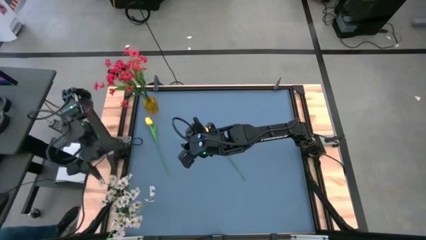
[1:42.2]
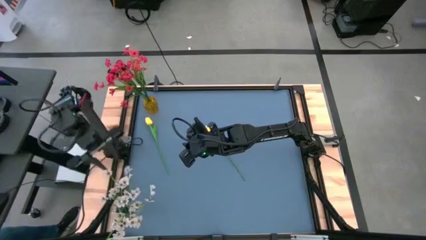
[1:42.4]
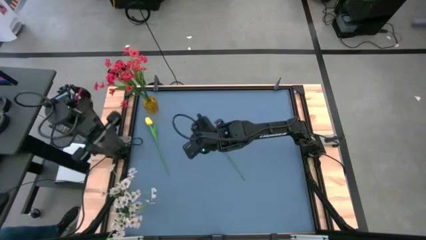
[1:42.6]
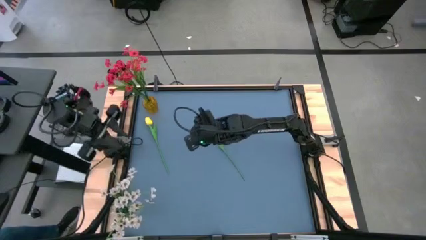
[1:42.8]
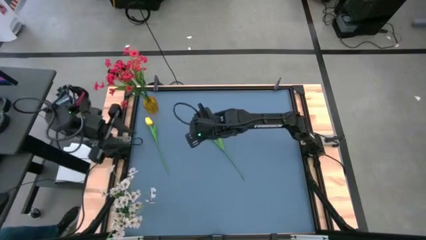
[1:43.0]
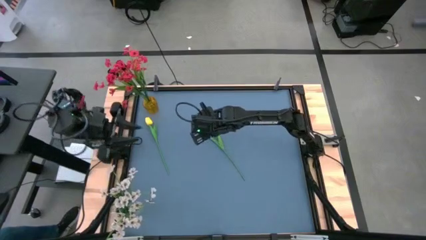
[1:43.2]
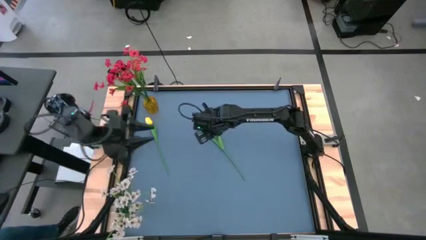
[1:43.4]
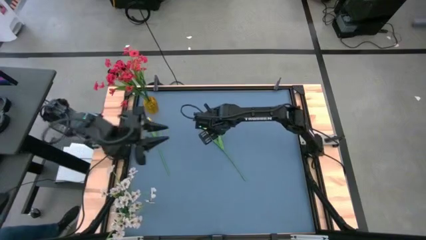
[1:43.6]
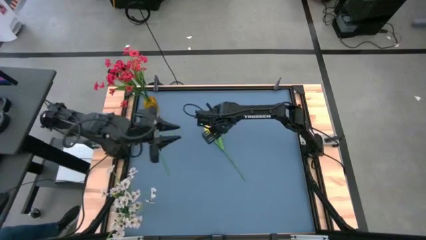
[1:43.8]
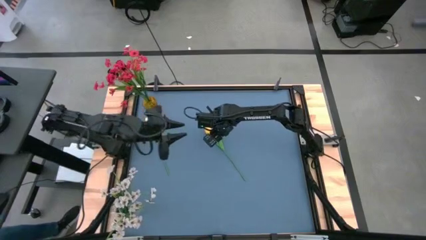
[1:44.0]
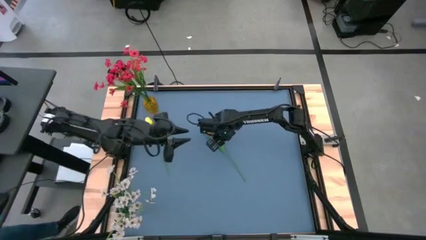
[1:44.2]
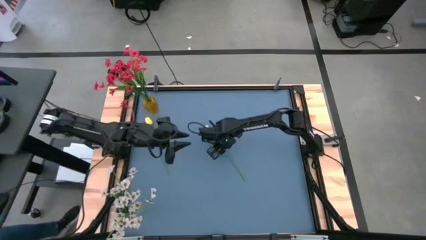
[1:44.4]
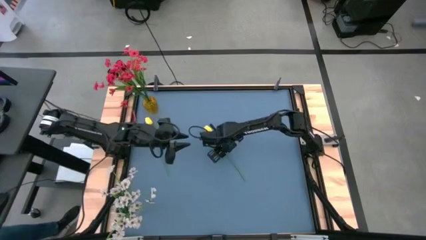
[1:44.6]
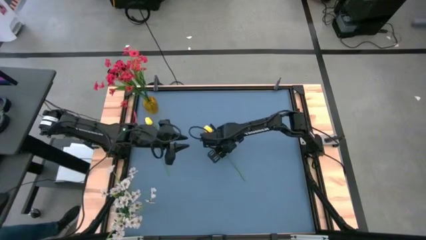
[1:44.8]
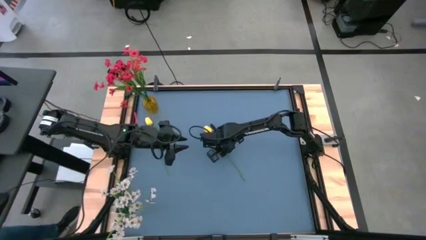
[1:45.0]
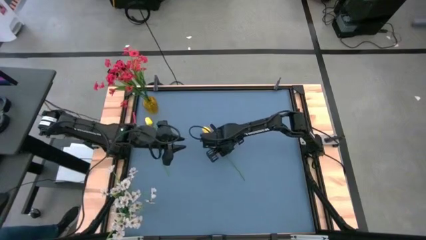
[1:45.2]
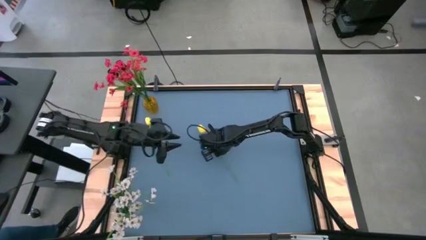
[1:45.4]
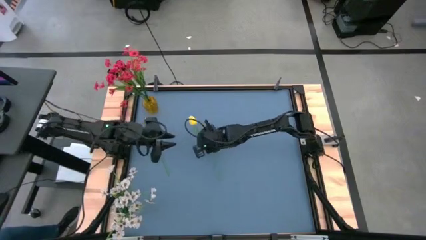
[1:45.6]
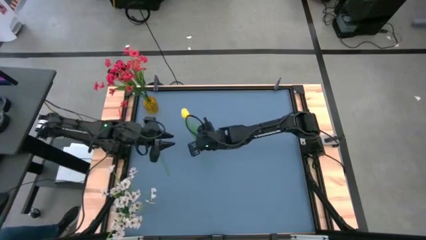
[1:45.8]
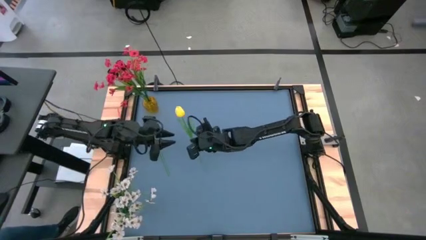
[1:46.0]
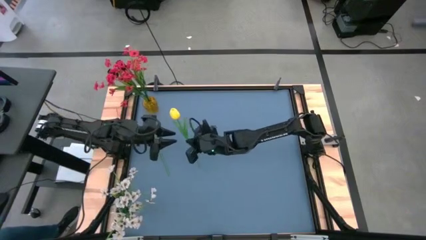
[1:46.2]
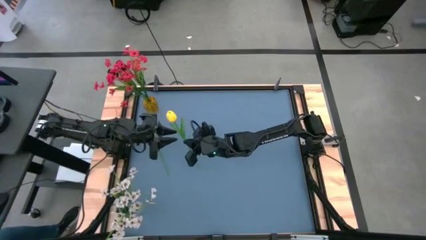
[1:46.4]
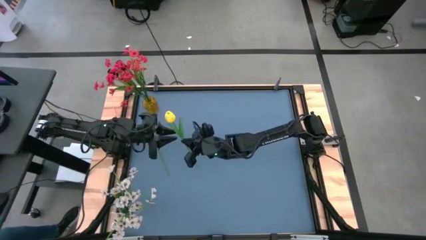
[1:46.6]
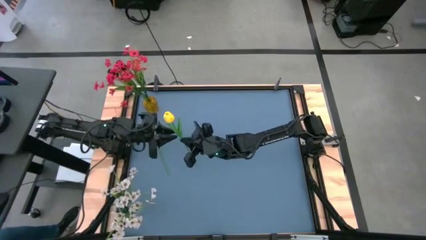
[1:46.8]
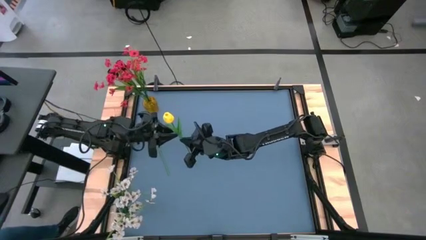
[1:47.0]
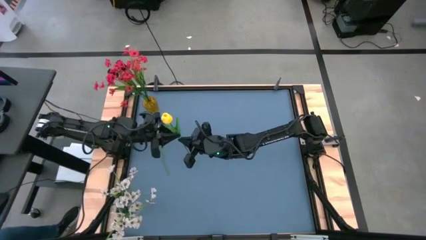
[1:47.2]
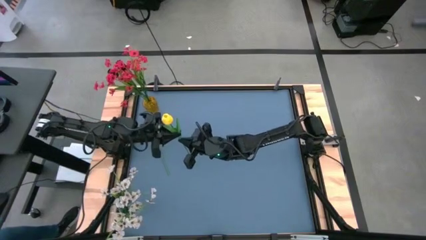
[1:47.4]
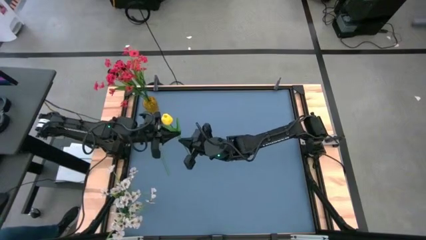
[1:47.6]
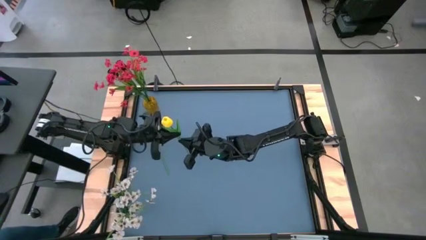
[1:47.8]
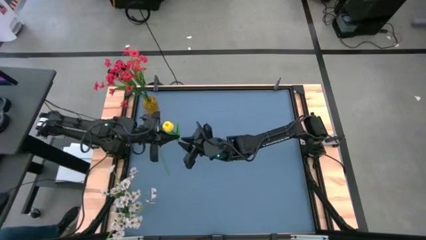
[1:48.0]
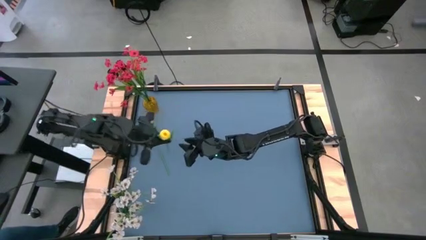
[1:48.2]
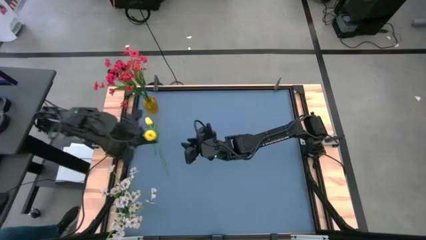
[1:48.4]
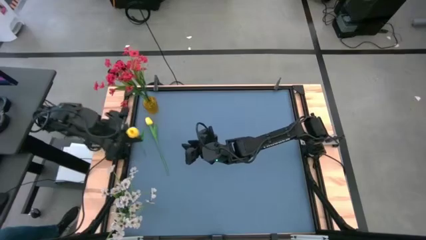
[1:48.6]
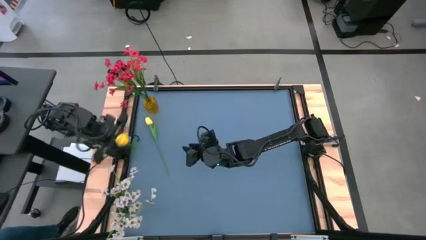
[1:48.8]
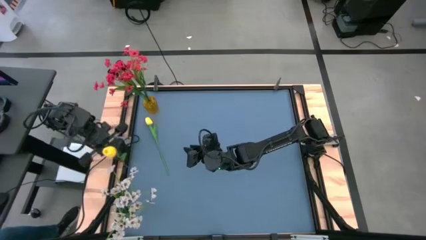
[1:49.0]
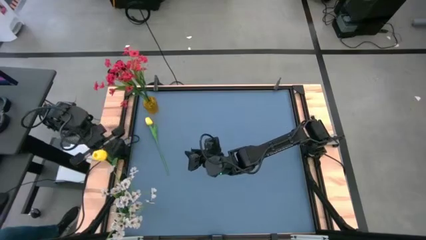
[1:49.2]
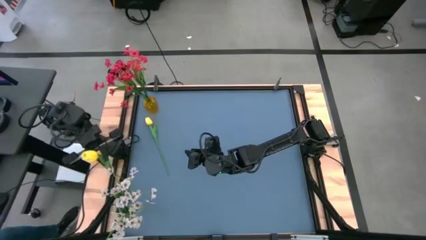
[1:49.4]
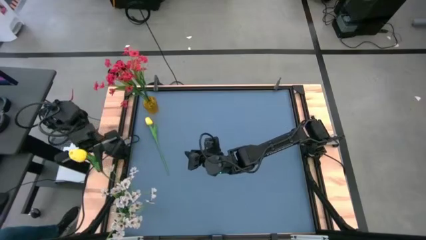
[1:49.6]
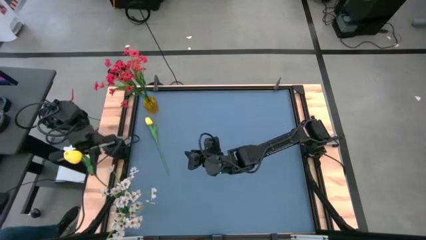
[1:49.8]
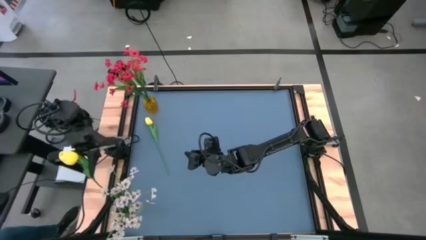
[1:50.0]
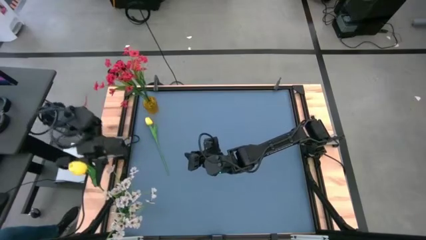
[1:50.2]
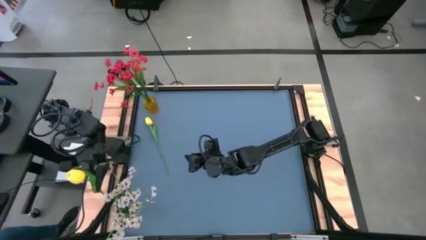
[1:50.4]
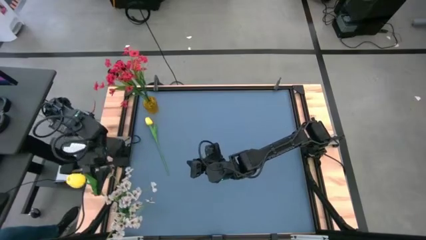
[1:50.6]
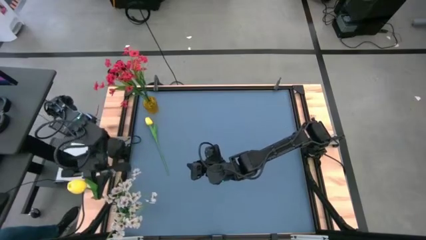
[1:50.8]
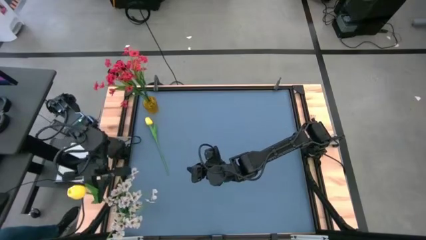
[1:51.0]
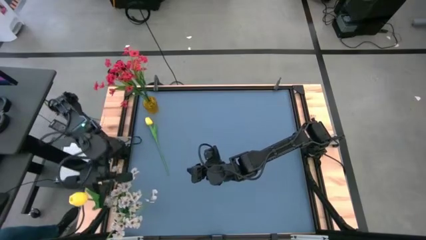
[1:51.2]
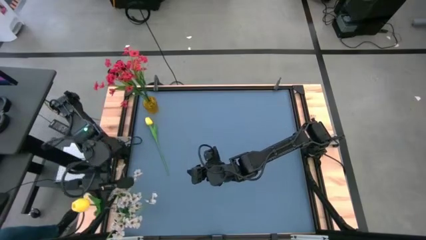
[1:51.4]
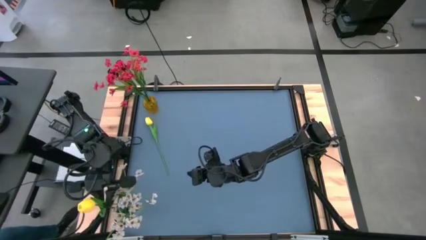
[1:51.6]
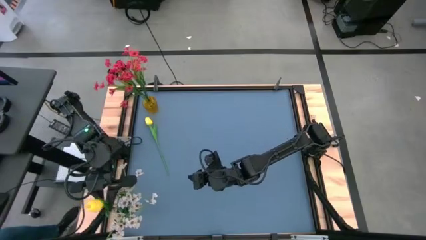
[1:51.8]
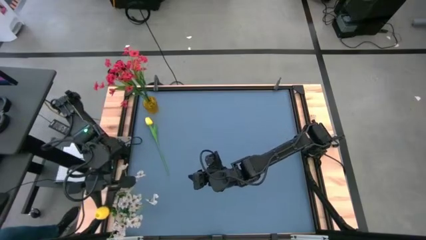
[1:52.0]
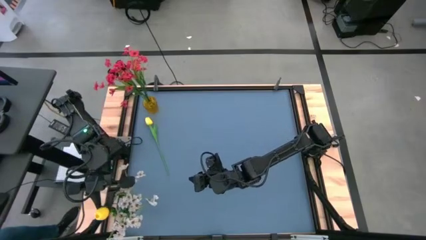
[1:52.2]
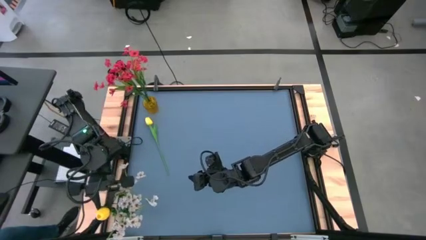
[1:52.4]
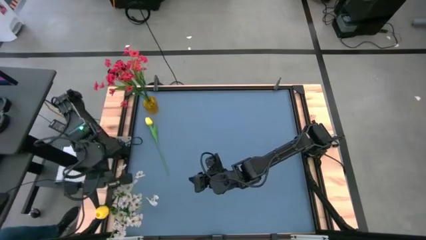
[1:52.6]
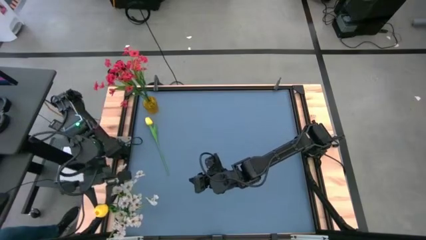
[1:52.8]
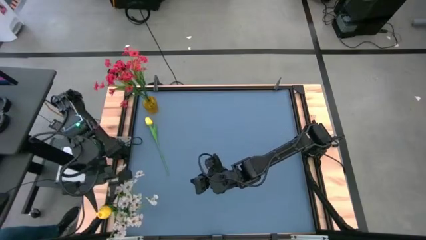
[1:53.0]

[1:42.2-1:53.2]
Task: Sort flowers into vase by color
Put the right yellow flower into the transparent vase
